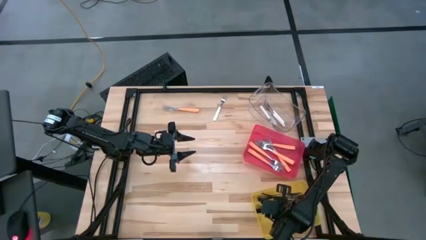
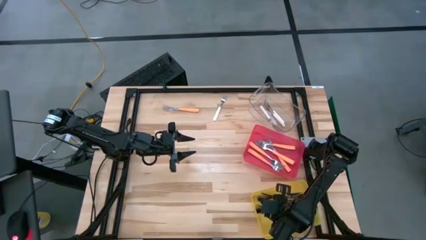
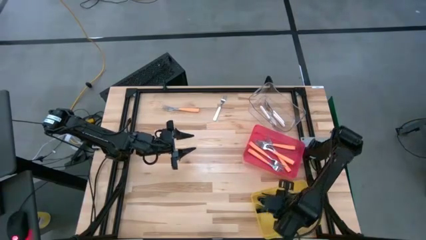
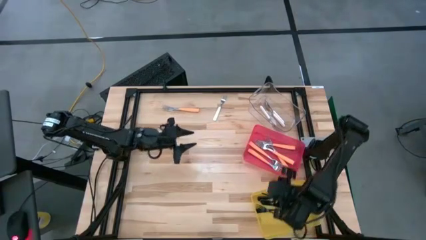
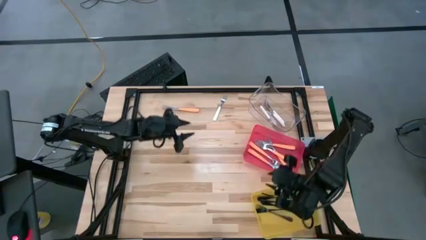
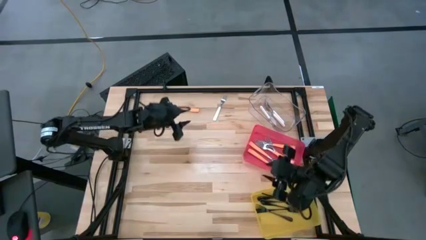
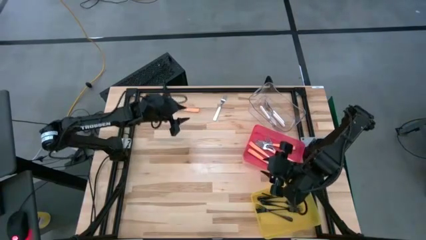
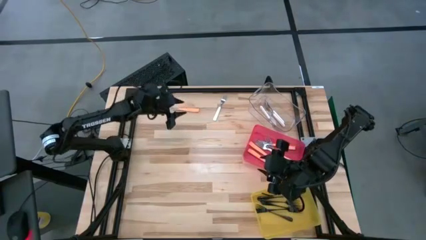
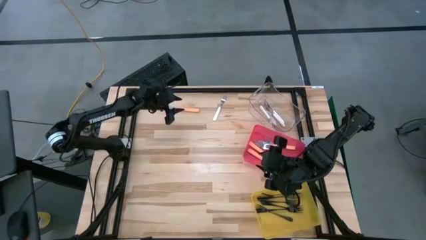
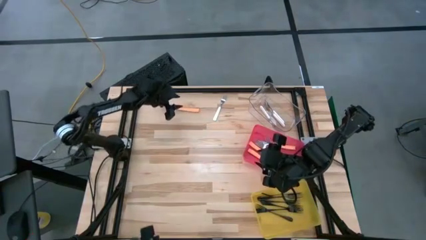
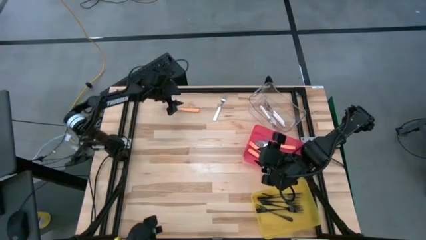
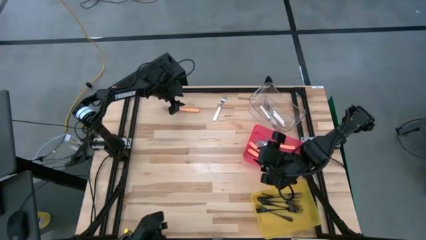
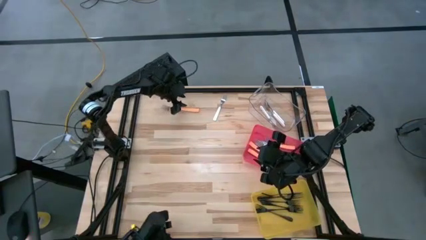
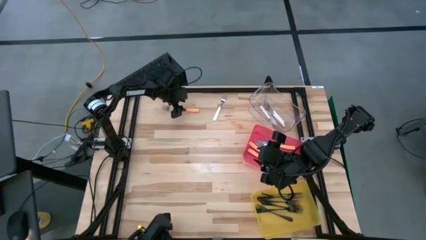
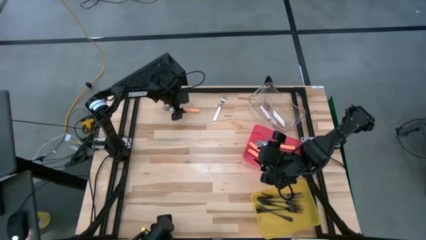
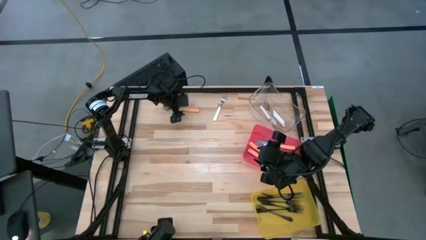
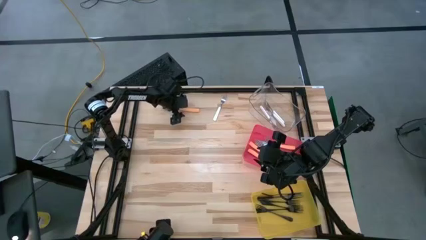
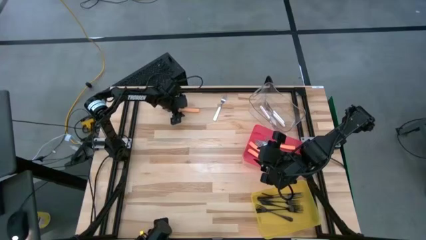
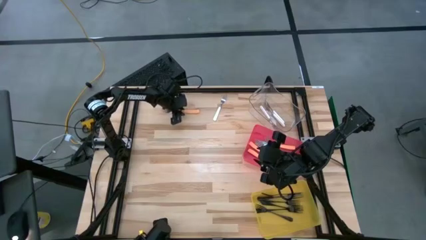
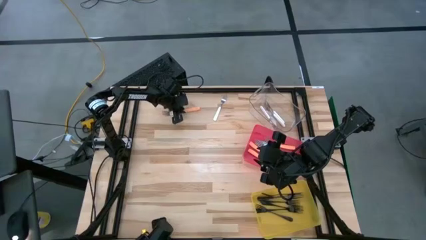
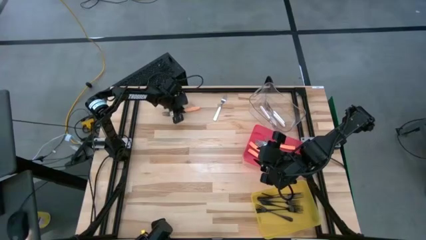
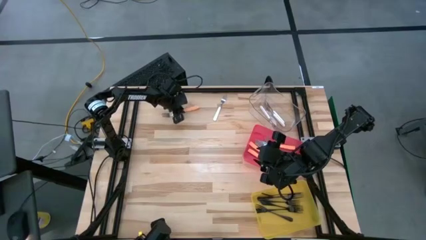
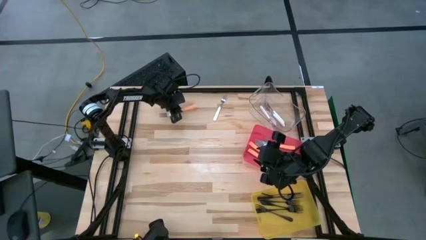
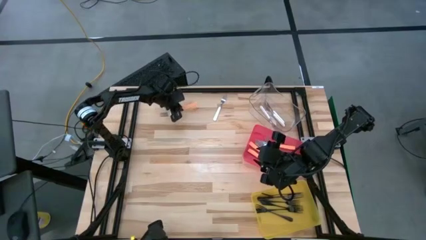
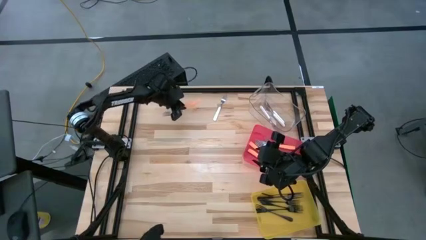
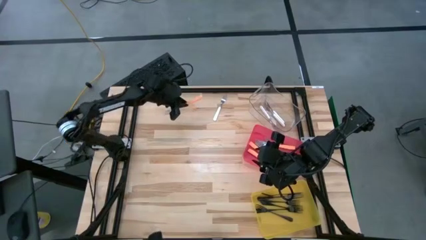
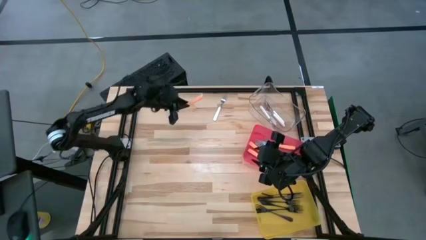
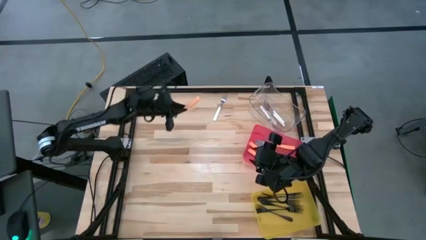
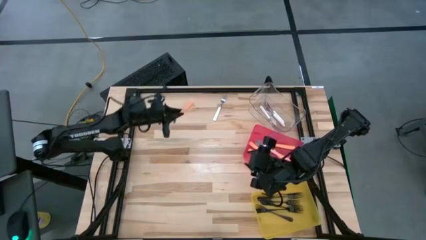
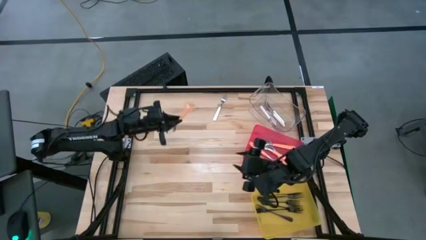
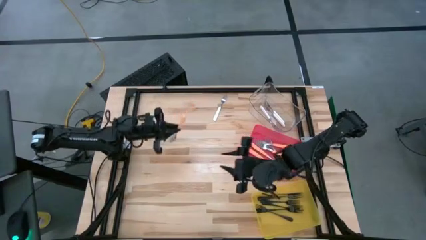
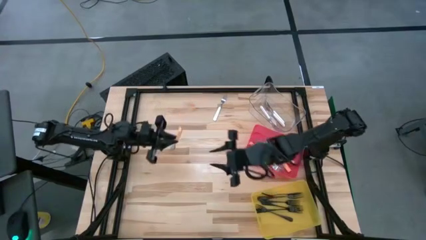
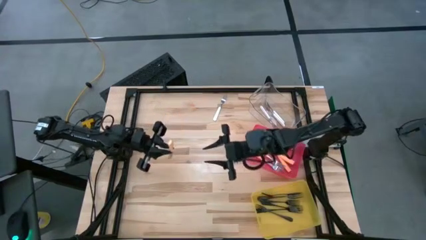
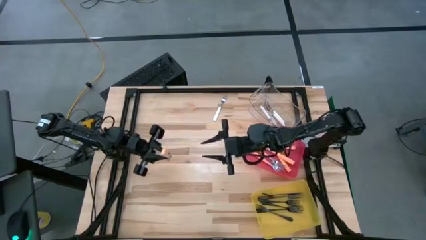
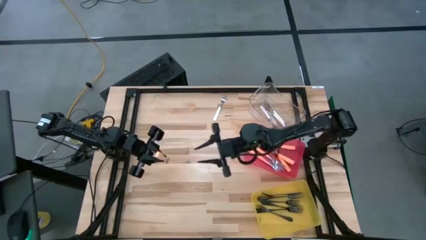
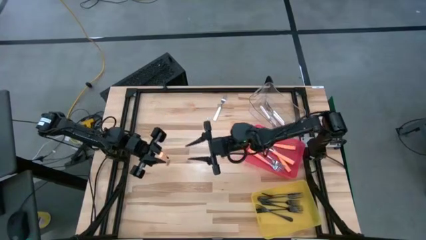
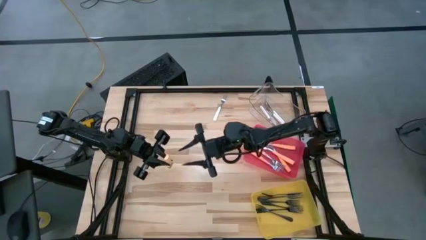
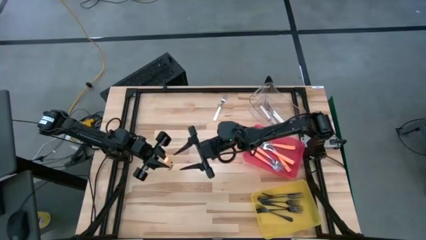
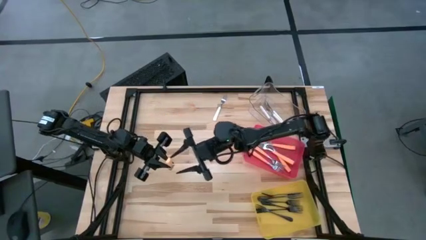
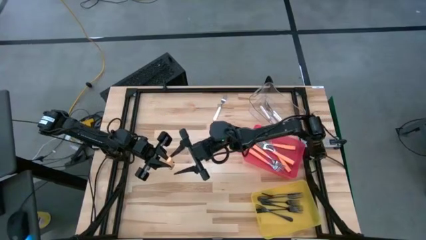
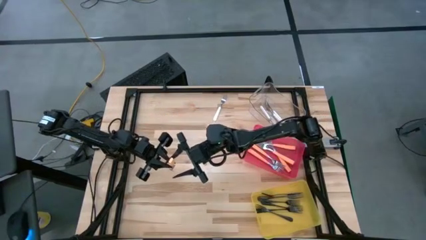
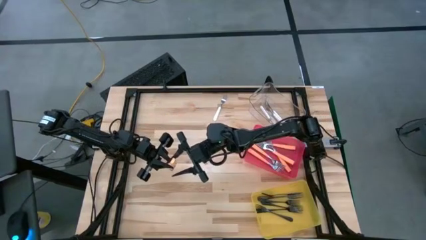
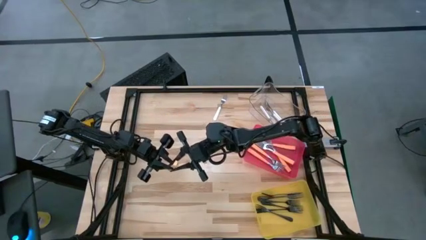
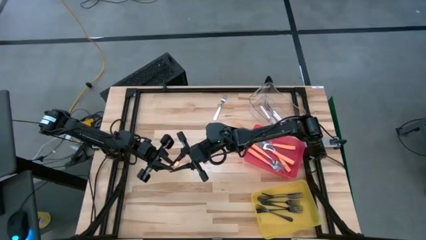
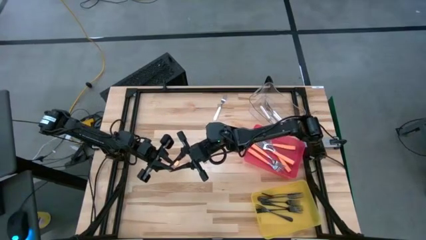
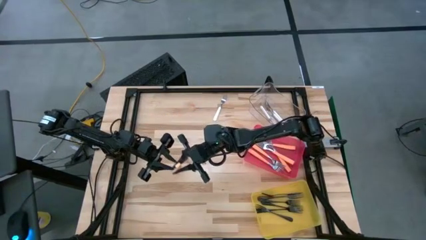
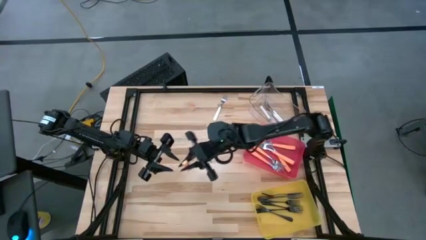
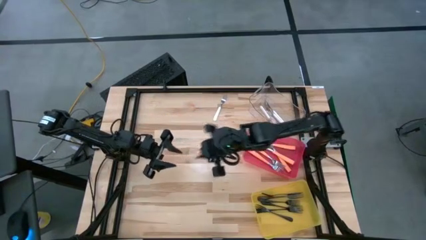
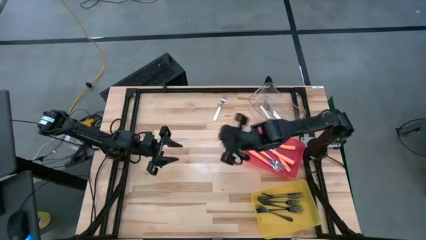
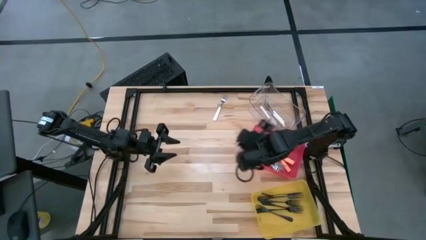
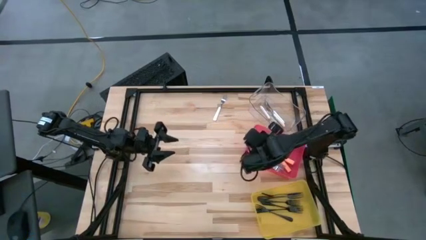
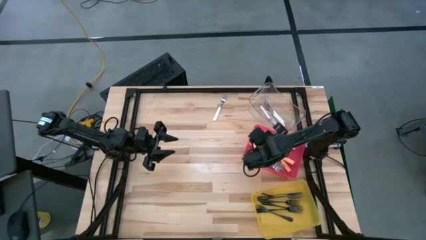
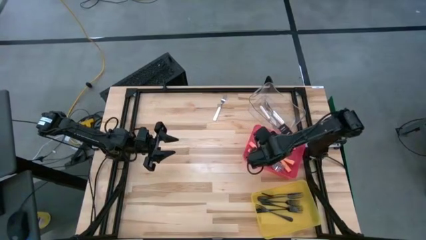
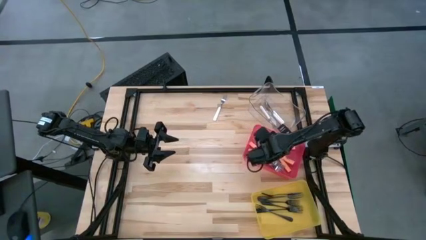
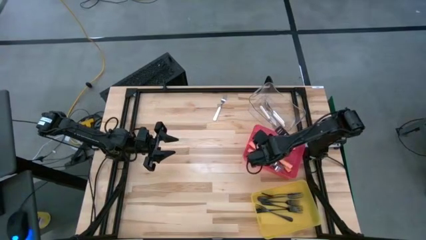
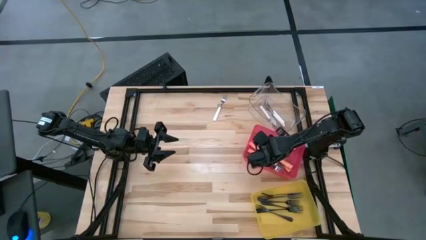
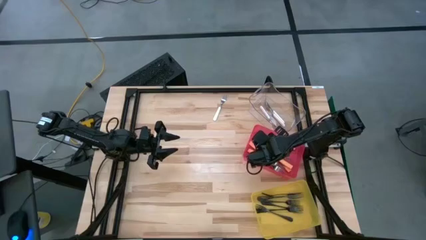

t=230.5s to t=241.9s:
Task: Sort silverware by color (type)
Put the orange fork into the red bin

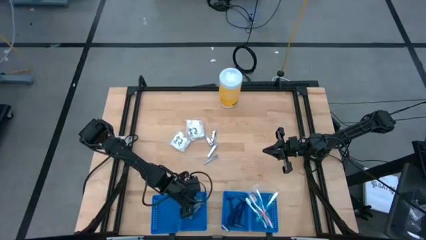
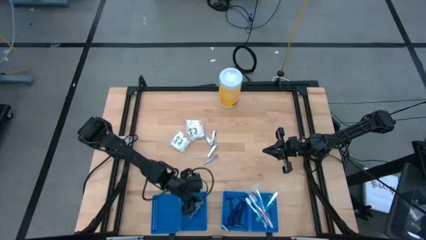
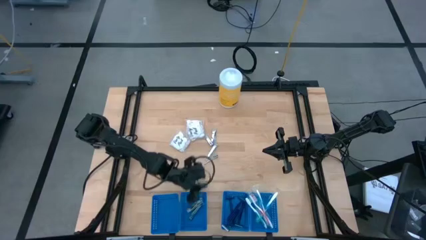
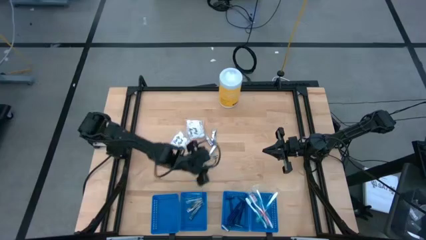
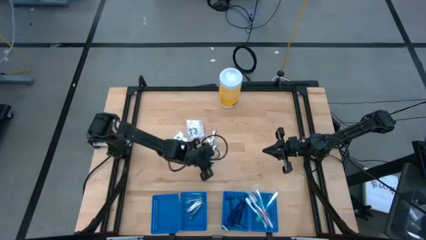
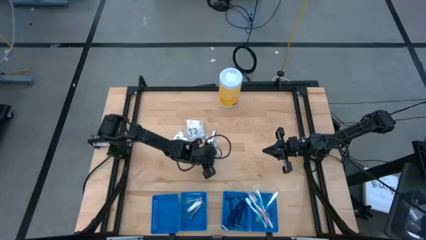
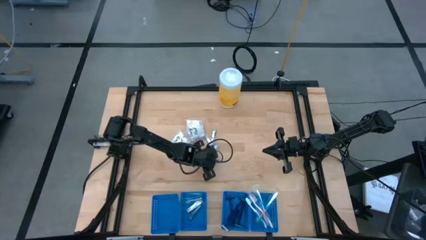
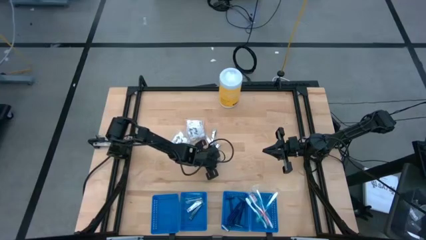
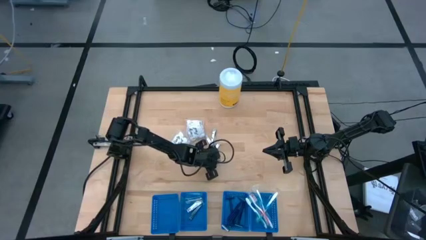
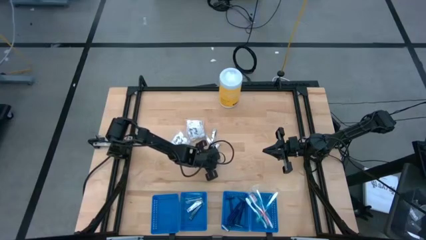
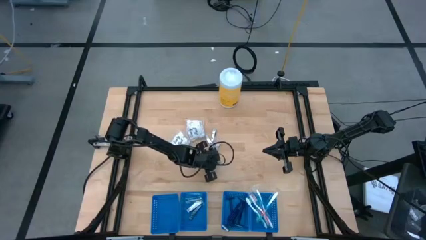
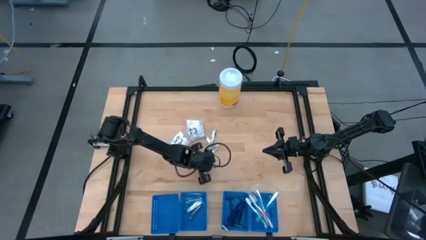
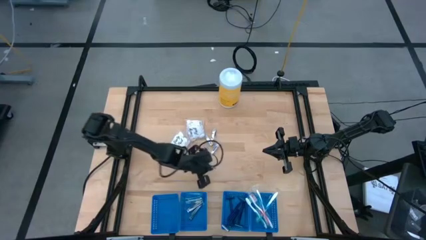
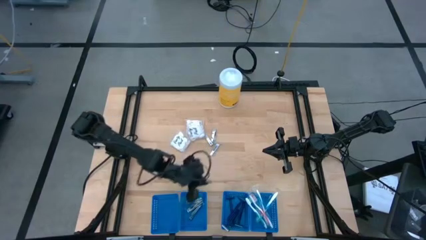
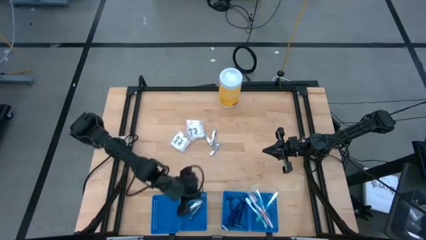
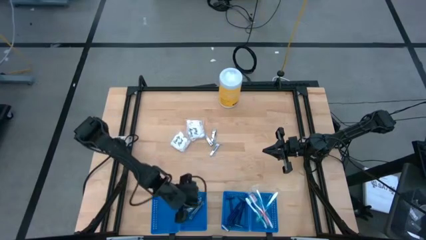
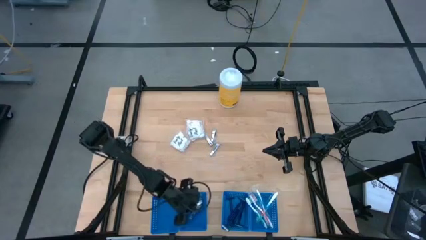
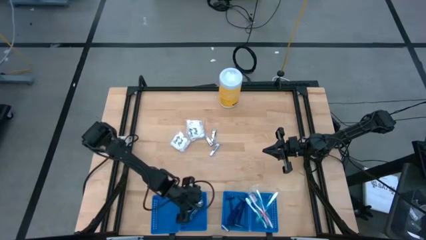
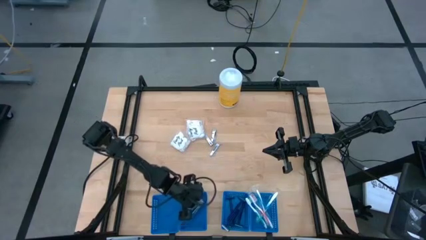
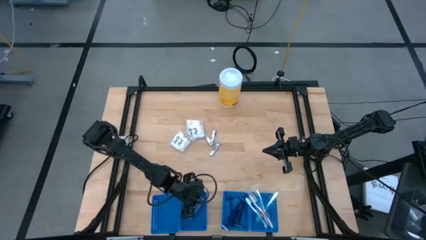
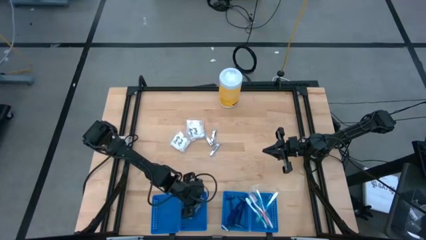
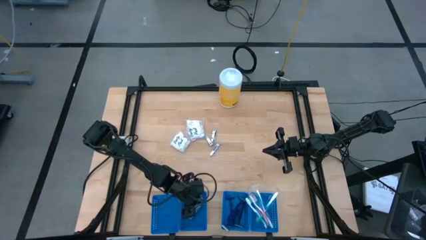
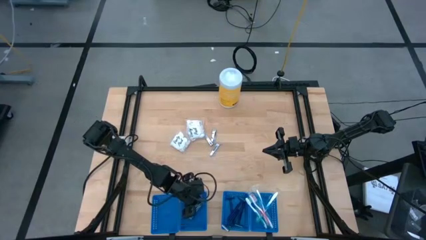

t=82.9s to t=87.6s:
Task: Pick & Place Travel size toiletries
Put the silver nail cutter into the blue basket

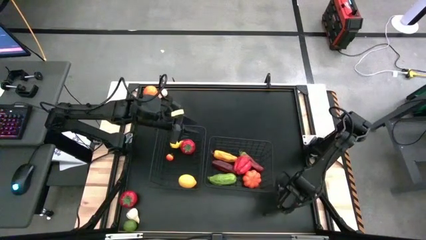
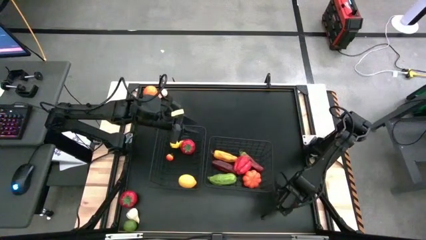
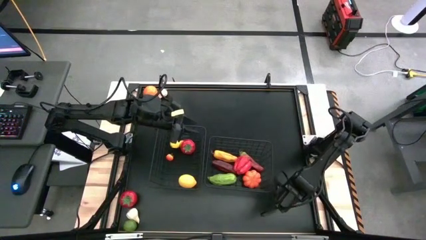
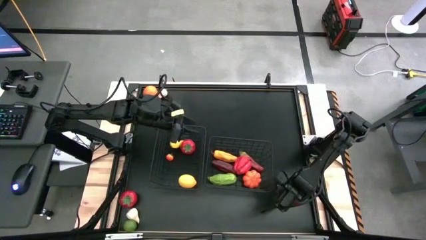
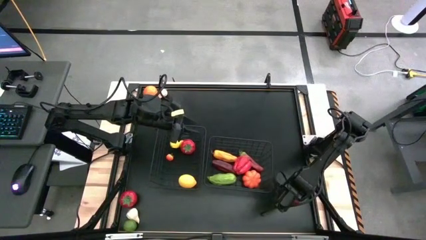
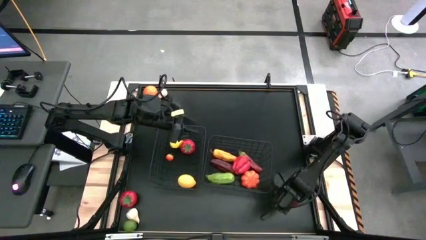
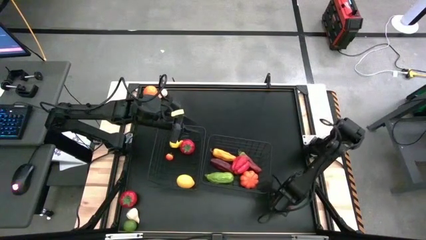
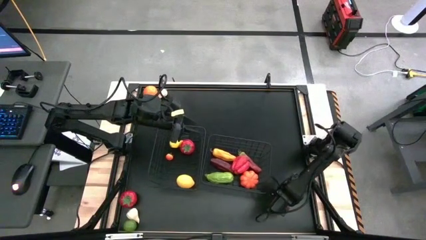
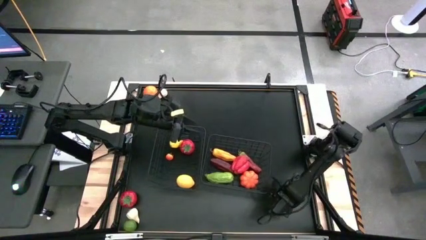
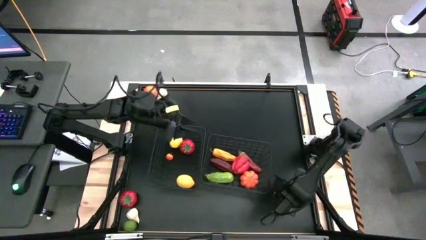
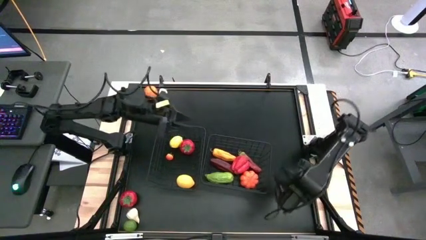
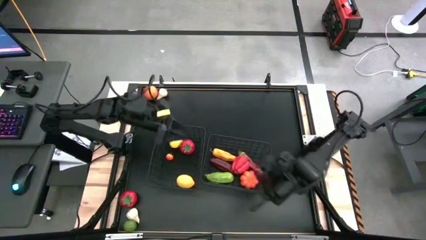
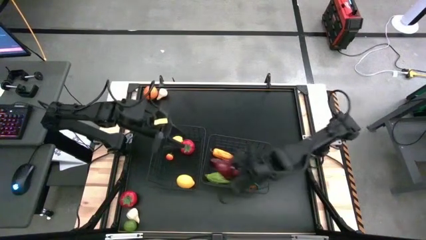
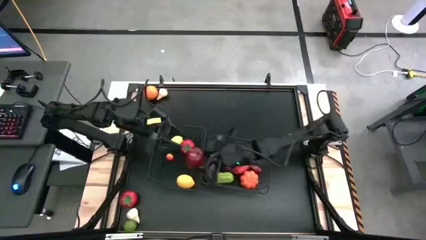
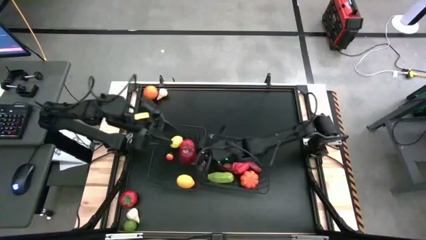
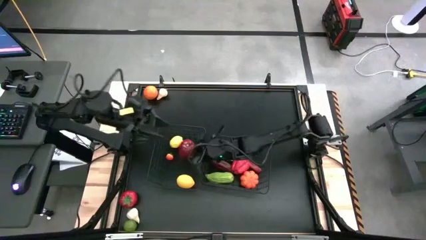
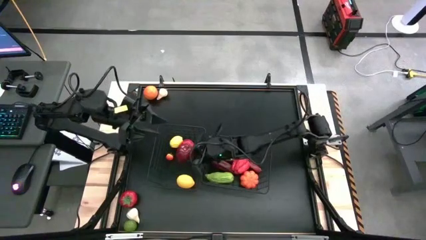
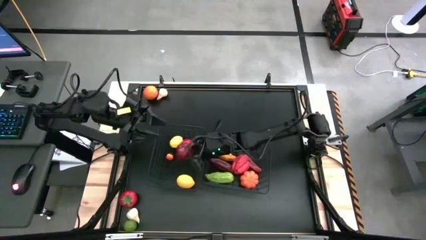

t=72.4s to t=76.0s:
Task: Sort produce into baskets
Put the red apple into the left wire basket
